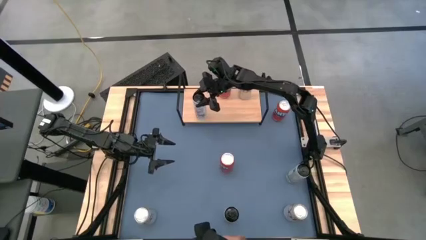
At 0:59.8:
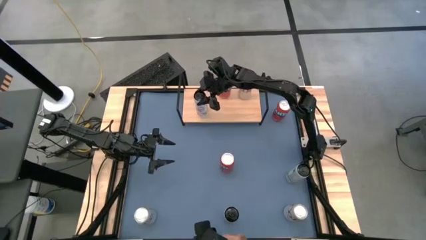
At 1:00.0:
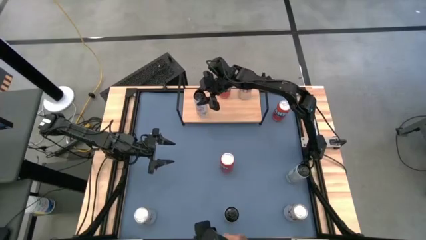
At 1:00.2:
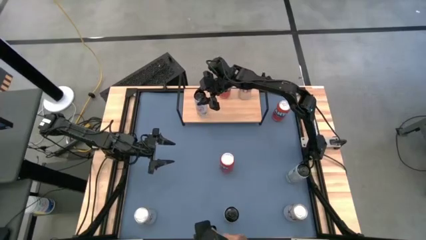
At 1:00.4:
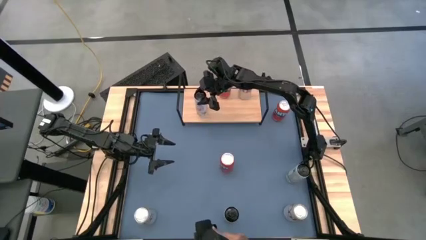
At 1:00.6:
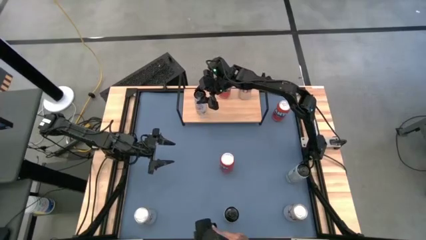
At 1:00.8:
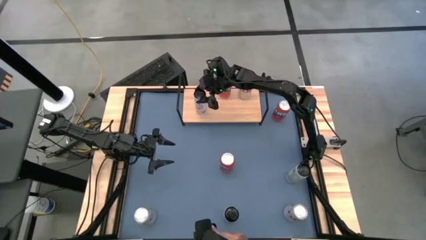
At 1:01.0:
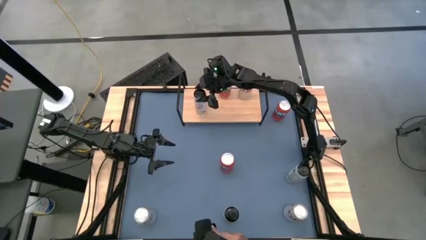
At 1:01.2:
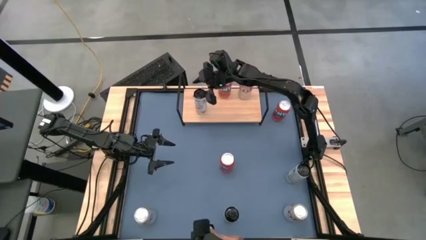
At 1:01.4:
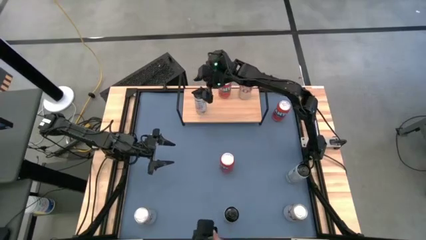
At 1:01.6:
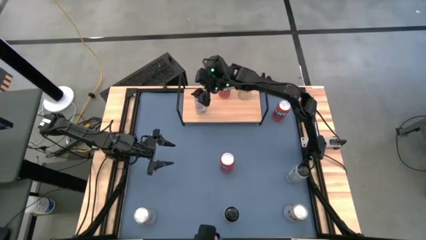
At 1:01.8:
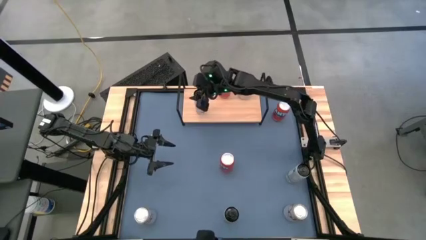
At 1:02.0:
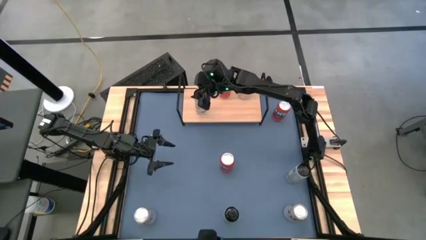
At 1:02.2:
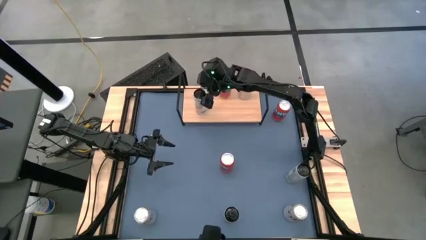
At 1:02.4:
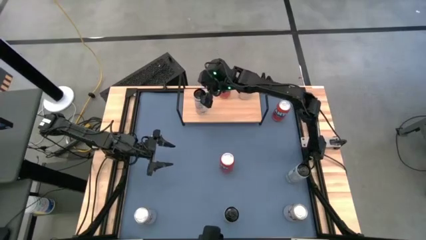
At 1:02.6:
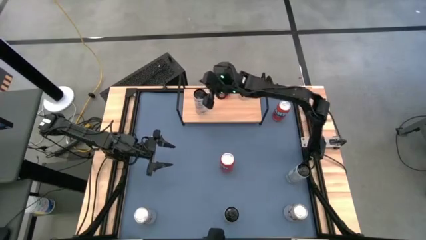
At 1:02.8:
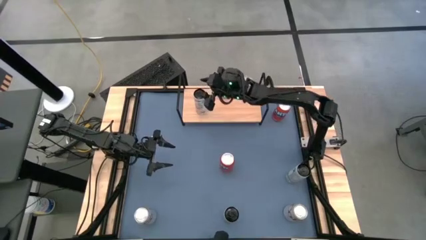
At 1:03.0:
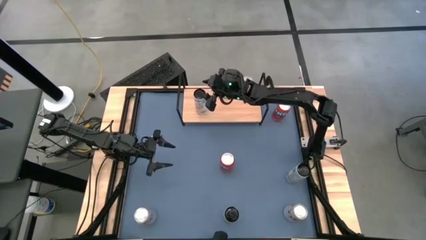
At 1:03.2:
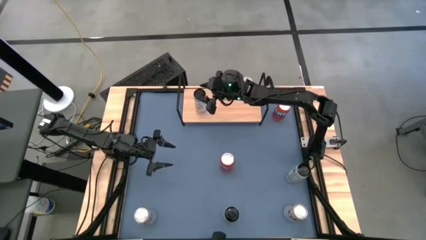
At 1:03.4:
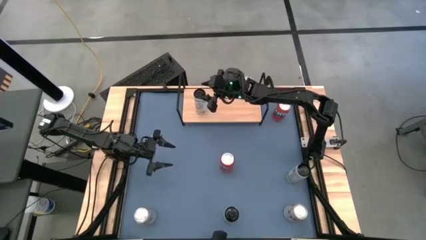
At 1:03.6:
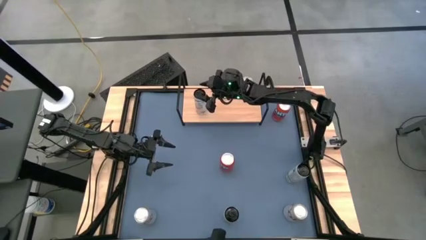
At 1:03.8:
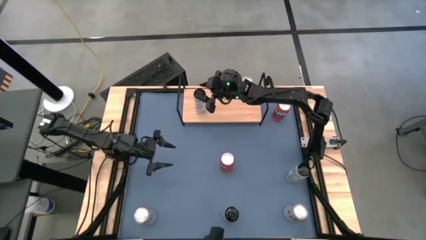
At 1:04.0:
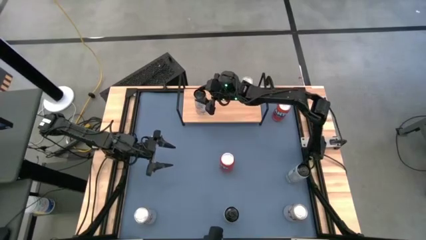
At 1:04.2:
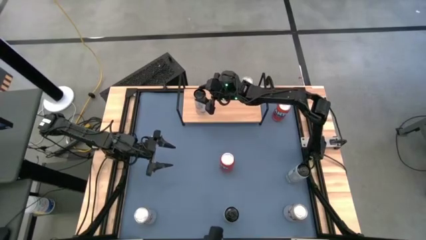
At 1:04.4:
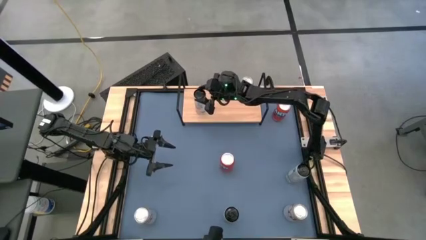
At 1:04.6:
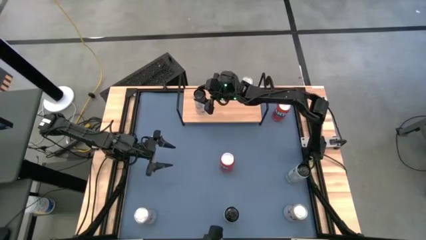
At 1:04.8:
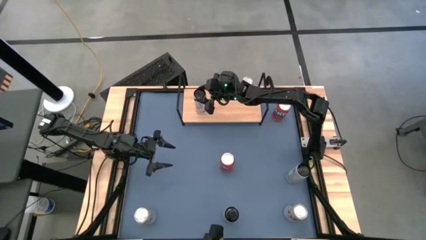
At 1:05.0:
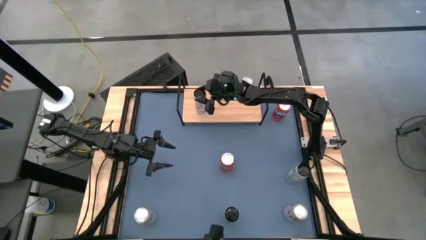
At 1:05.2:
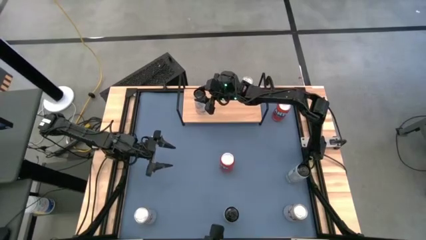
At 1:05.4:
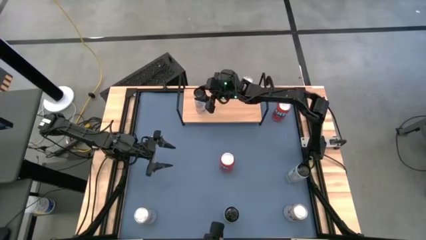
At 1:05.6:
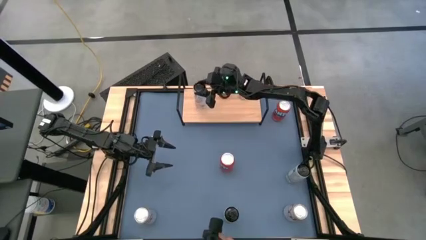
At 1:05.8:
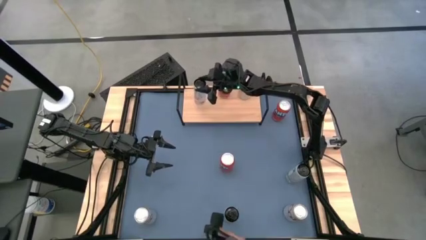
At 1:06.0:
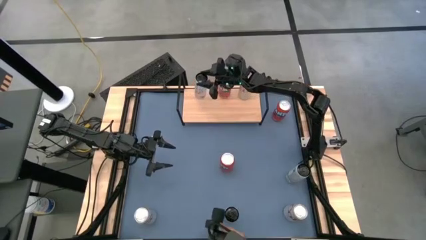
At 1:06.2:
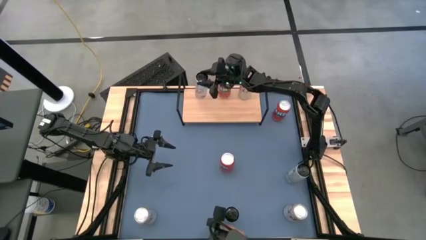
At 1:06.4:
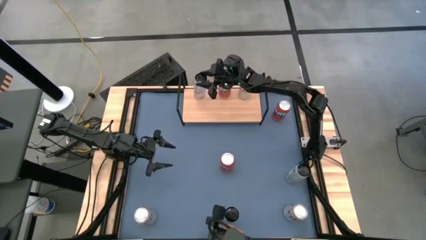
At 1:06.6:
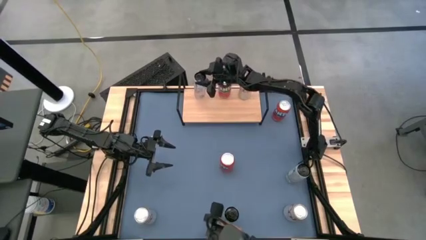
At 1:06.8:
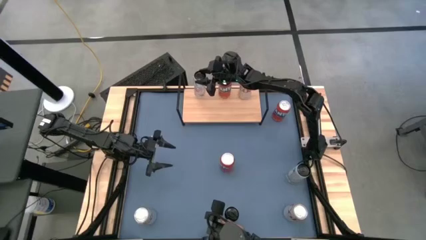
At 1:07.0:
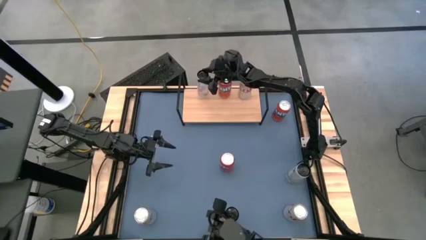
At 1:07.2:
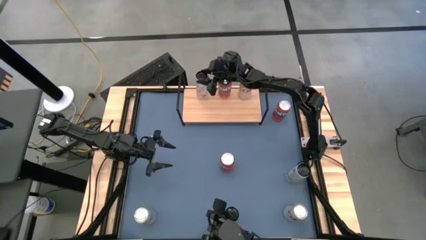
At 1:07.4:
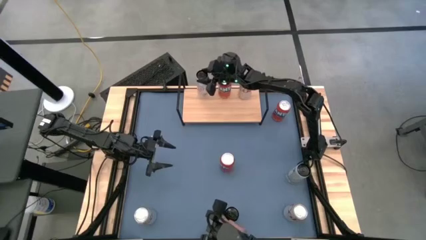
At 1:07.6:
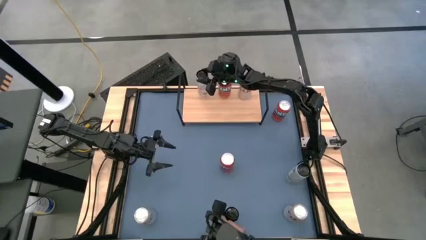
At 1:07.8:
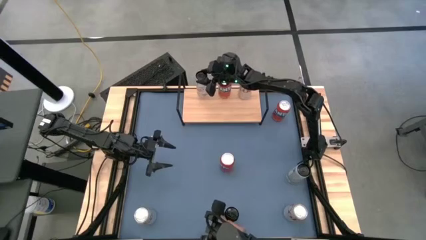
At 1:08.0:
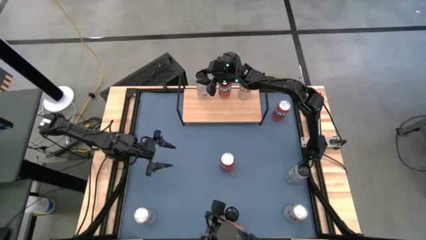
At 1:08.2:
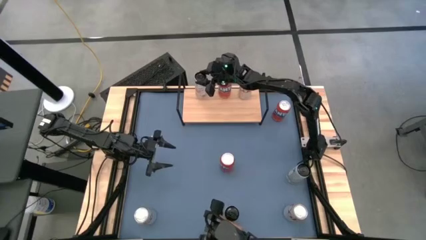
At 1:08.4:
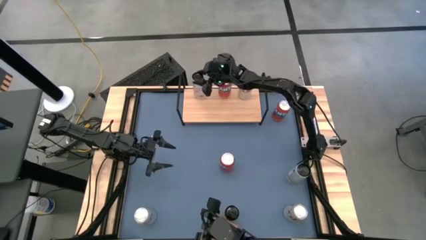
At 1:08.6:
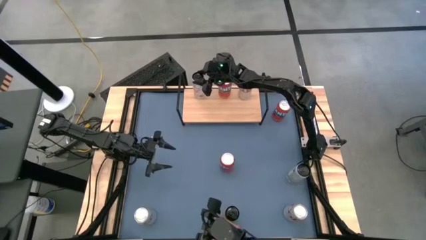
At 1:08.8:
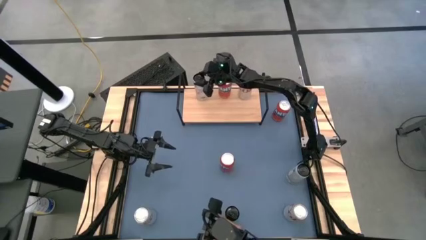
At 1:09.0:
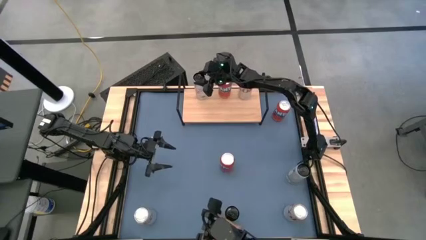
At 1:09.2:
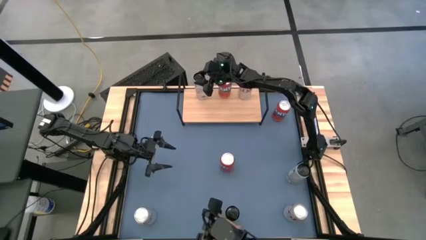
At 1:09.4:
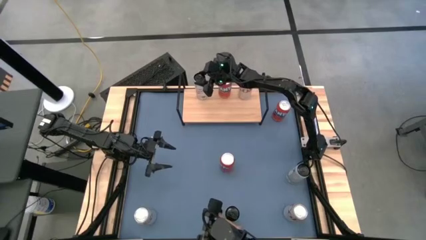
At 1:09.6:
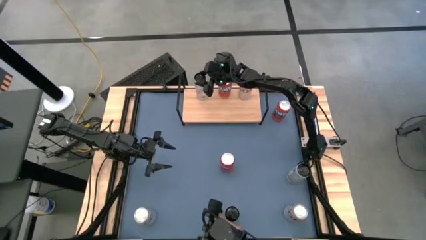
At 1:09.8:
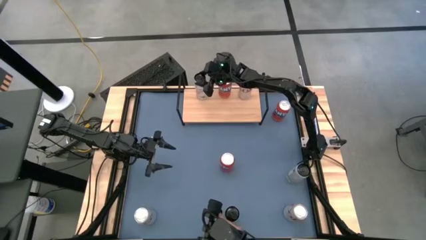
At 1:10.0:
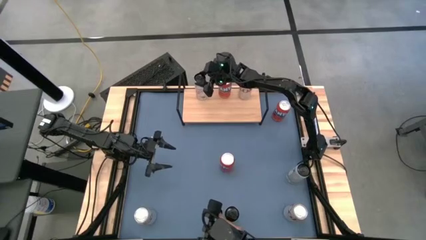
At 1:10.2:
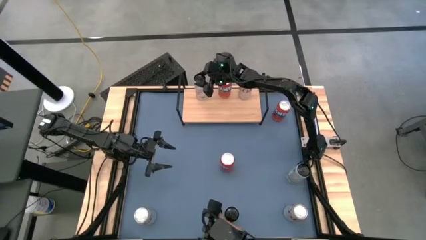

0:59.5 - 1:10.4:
Task: Place canned beverage on shelf
Put the top left black soda can on the shelf

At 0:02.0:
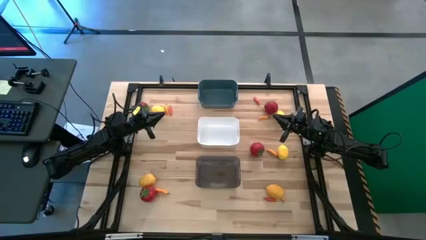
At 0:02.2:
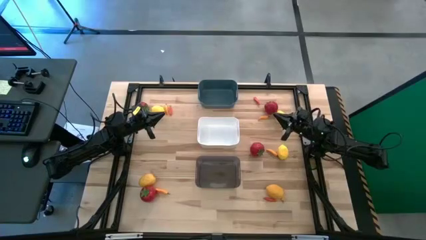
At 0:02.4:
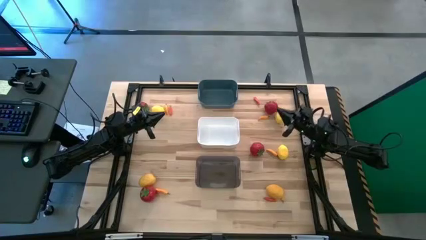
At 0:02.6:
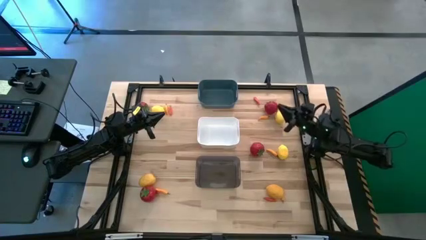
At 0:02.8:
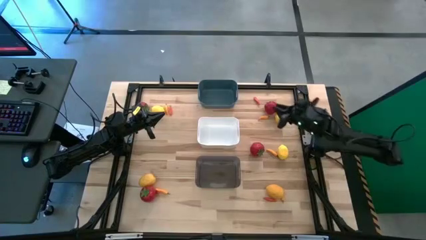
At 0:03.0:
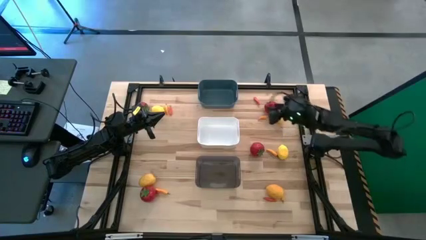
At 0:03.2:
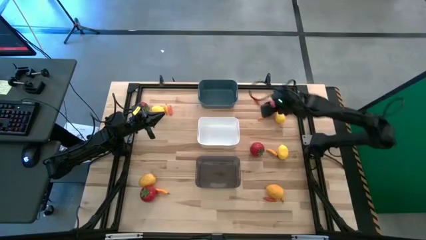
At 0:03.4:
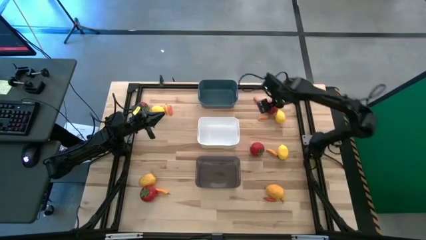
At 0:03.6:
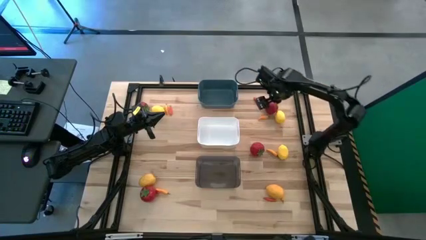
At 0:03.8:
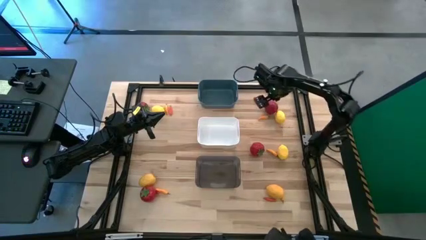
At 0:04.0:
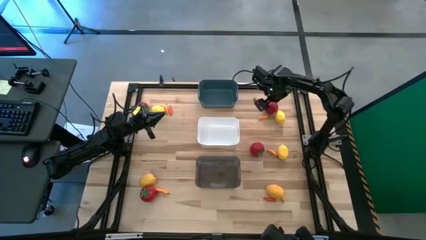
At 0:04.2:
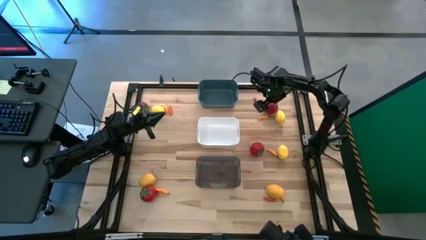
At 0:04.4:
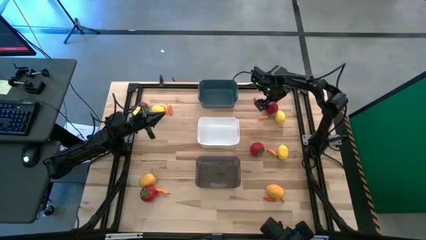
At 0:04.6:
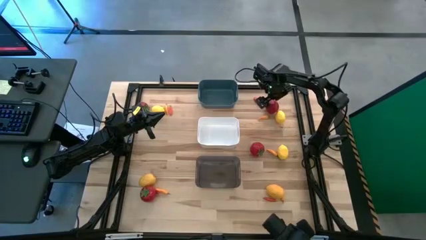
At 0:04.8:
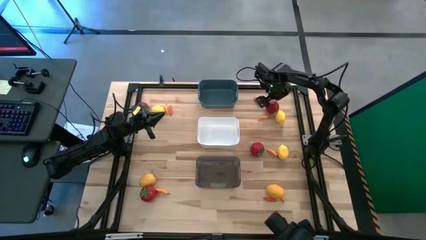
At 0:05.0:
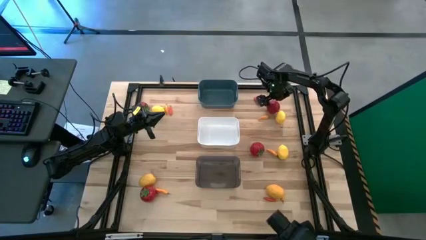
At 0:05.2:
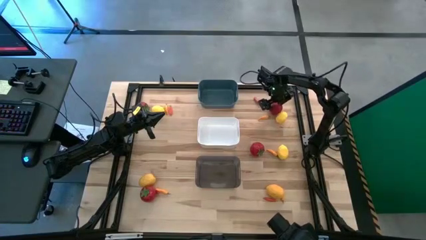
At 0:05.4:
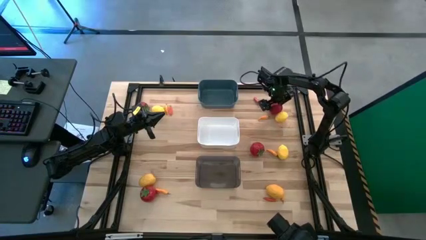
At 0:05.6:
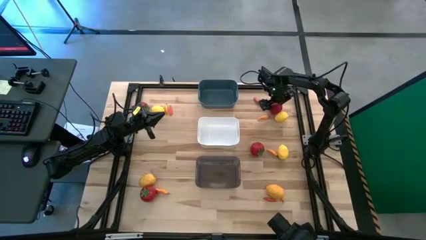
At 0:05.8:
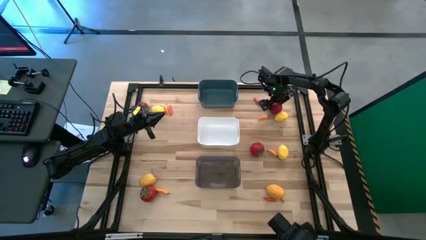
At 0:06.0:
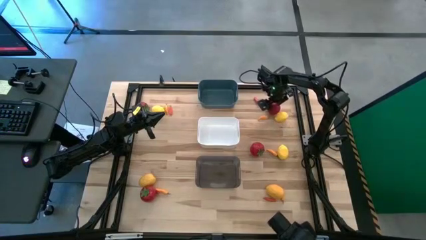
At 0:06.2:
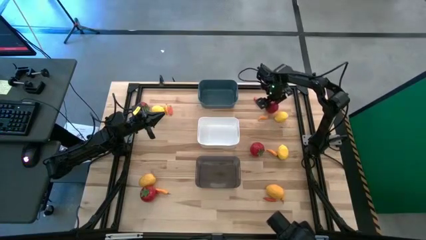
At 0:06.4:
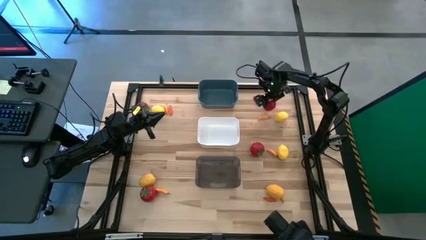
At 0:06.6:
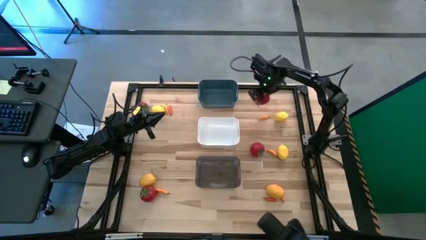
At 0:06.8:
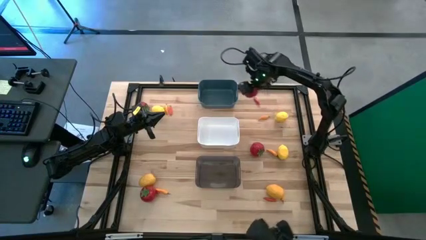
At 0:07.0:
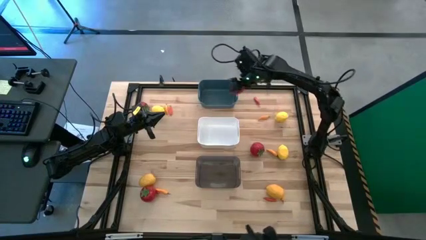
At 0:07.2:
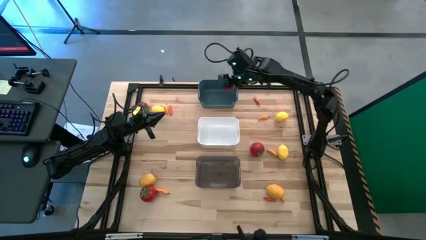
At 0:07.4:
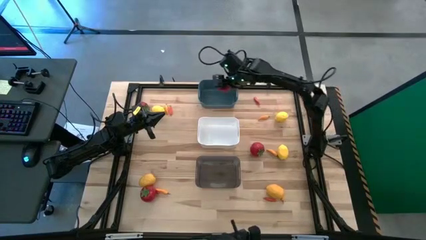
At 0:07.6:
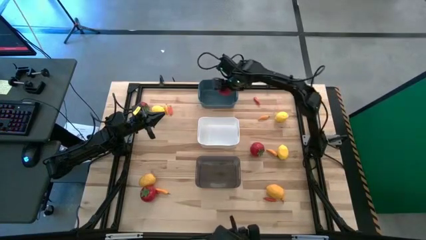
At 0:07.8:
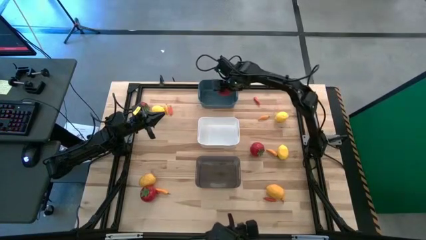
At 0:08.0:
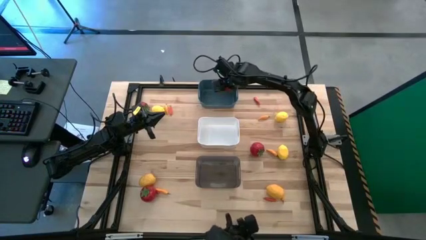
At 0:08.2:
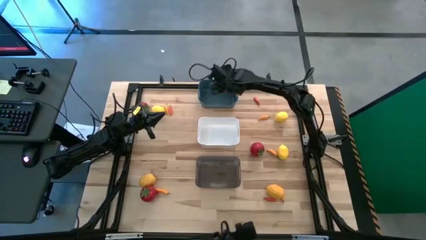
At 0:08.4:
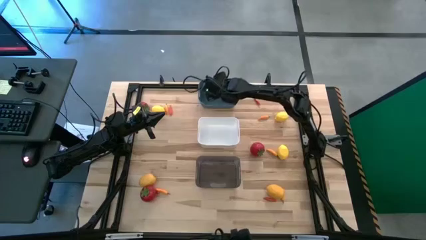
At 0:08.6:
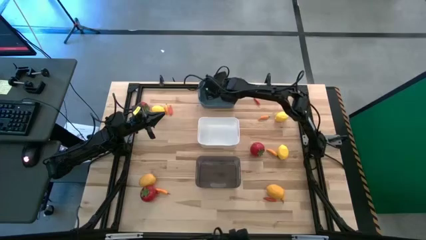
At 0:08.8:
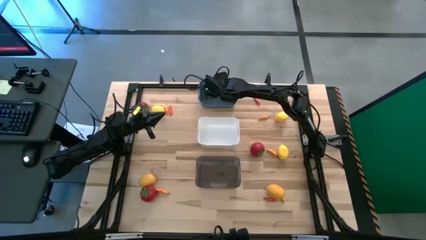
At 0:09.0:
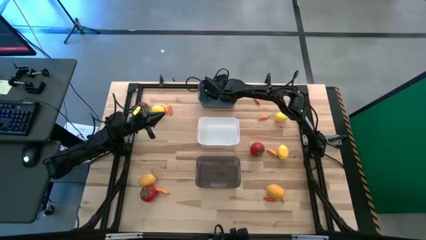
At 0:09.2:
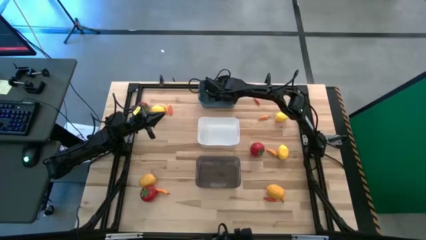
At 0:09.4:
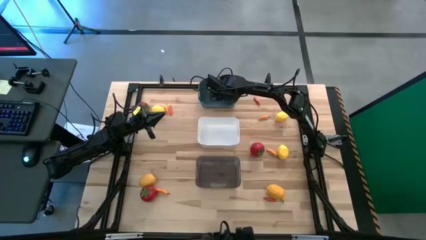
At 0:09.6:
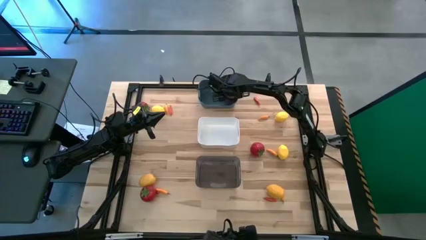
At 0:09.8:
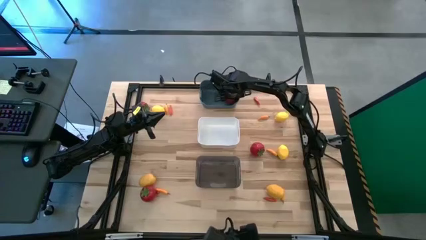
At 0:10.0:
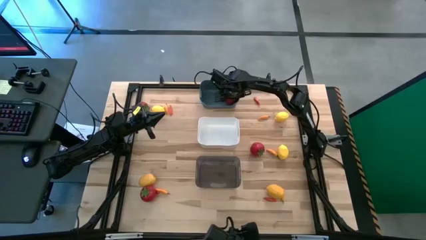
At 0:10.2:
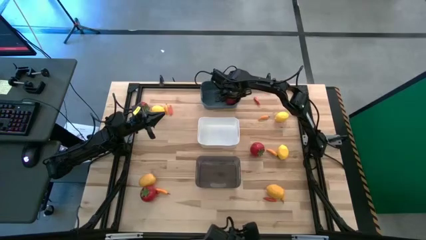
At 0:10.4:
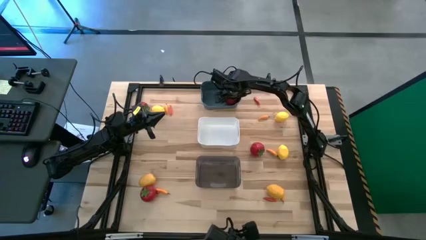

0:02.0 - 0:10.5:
Task: Sort produce into baskets
Put the red tomato into the blue bin
